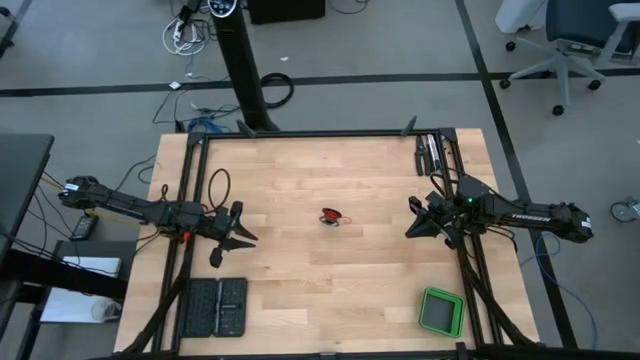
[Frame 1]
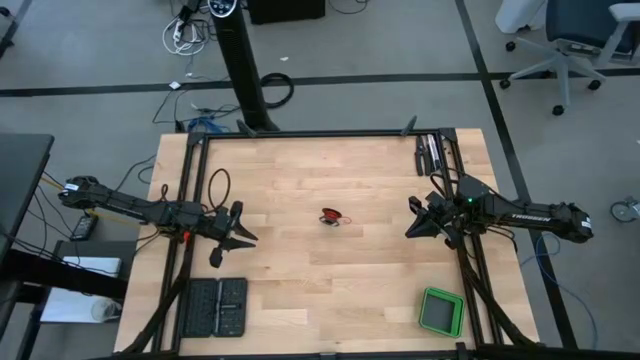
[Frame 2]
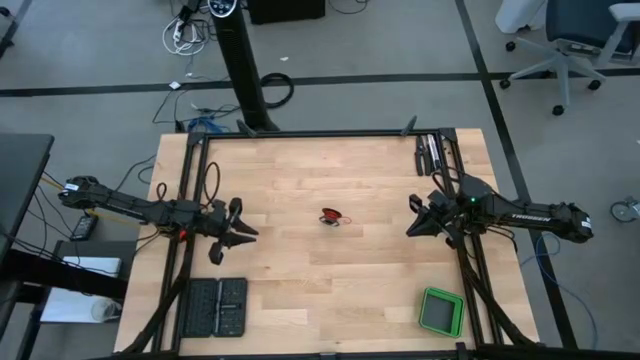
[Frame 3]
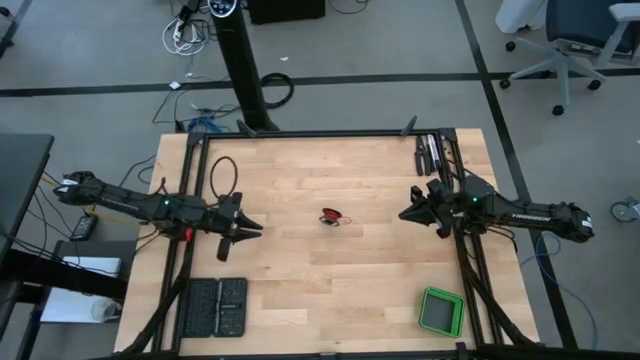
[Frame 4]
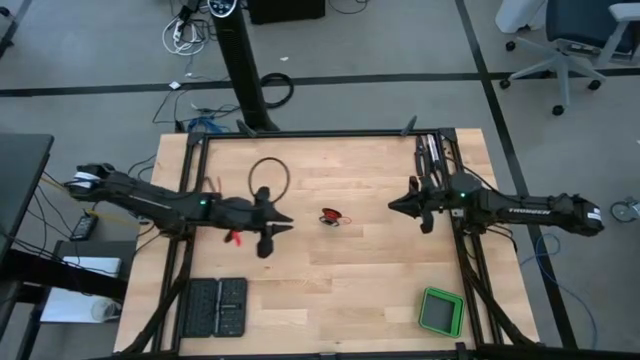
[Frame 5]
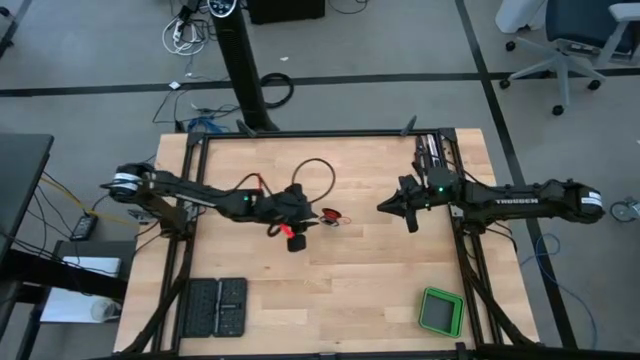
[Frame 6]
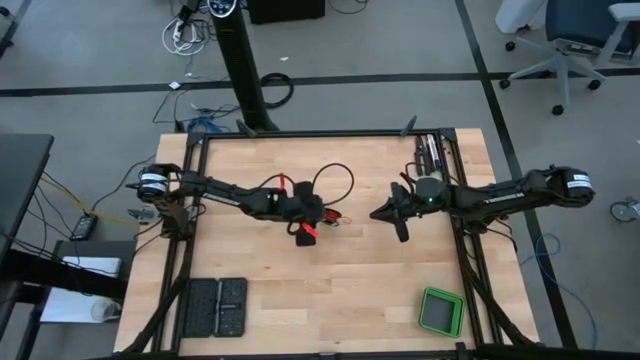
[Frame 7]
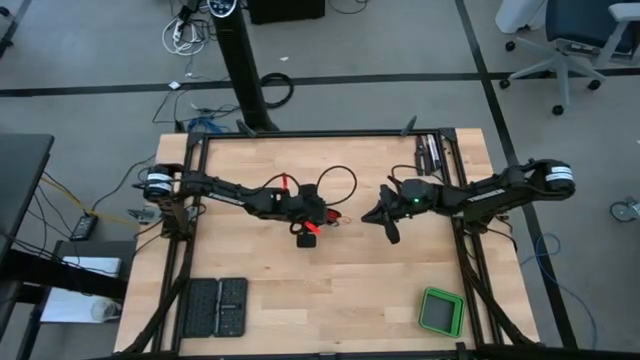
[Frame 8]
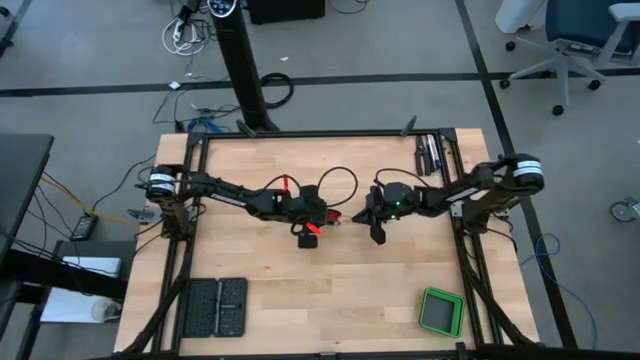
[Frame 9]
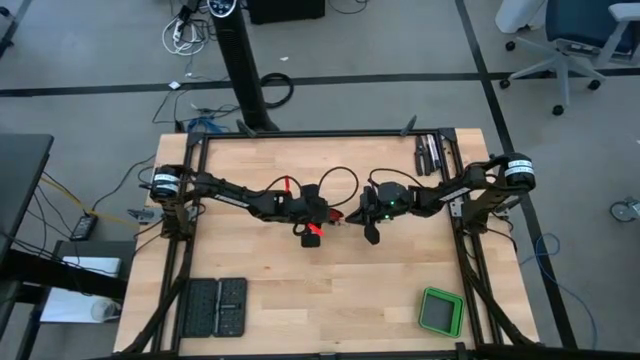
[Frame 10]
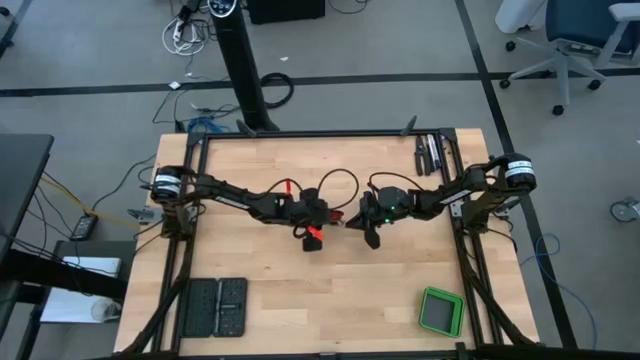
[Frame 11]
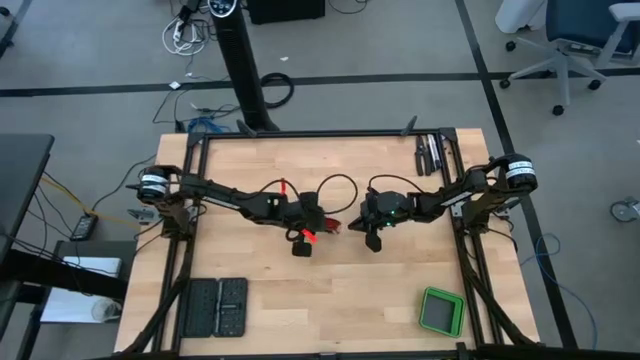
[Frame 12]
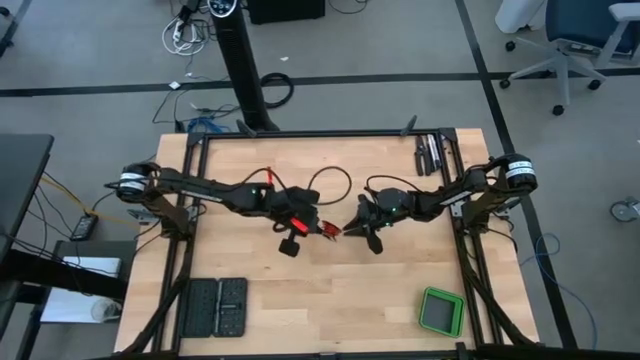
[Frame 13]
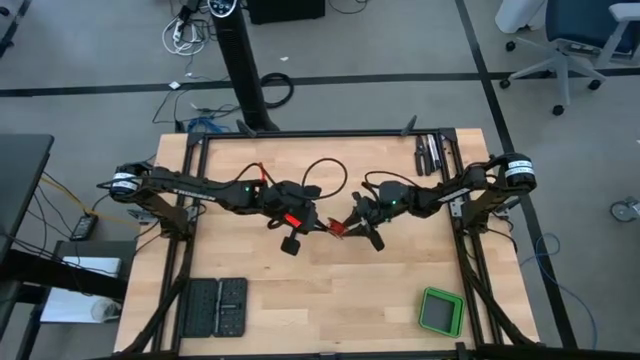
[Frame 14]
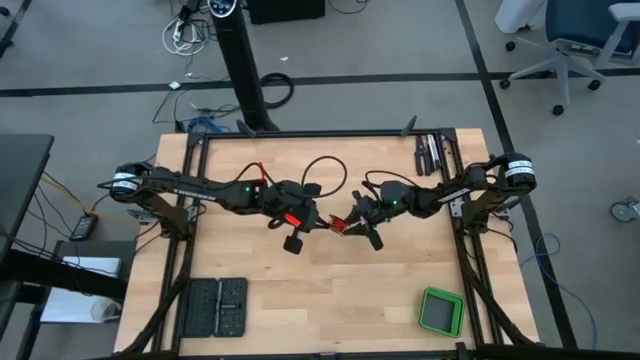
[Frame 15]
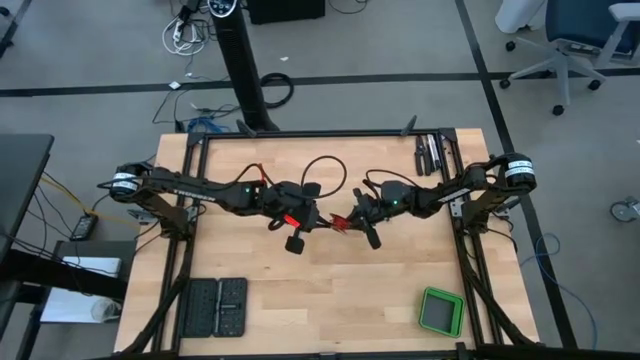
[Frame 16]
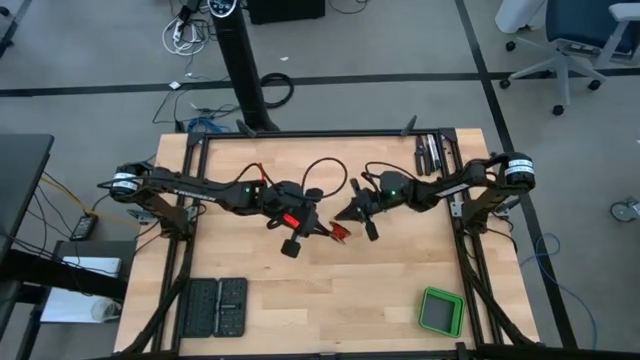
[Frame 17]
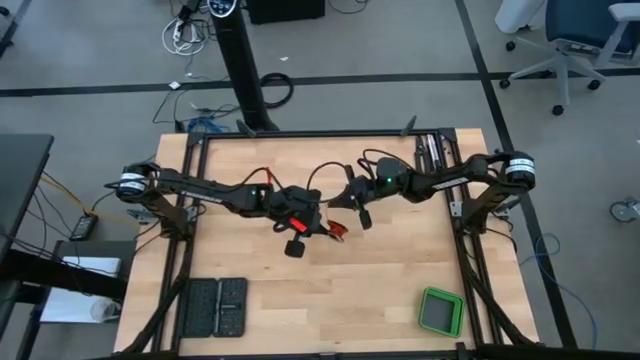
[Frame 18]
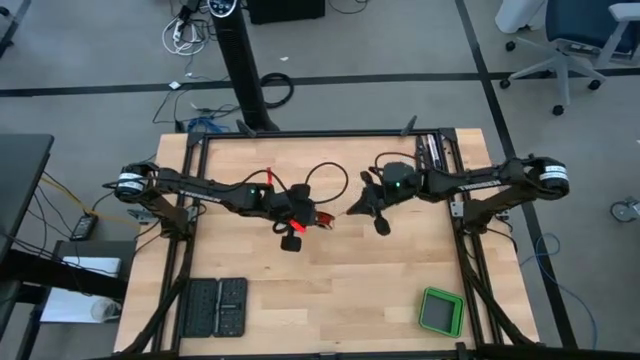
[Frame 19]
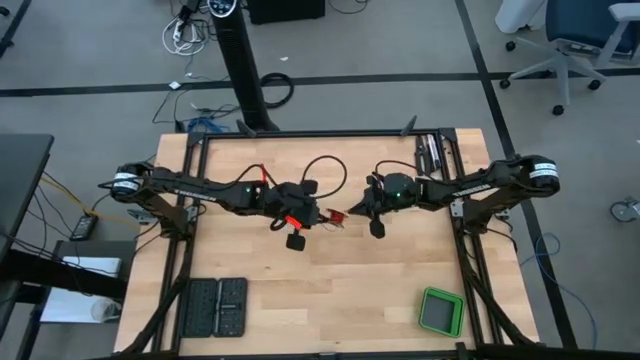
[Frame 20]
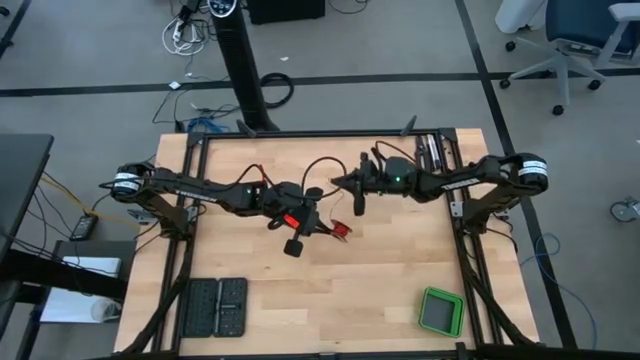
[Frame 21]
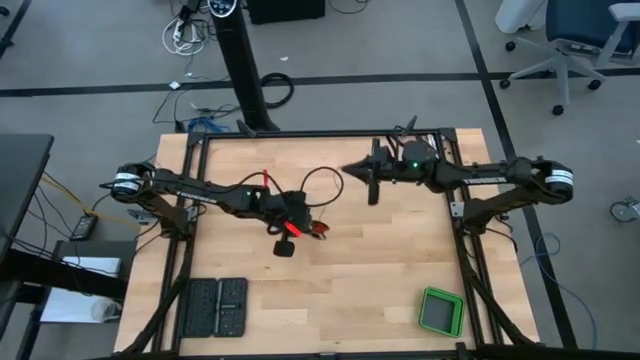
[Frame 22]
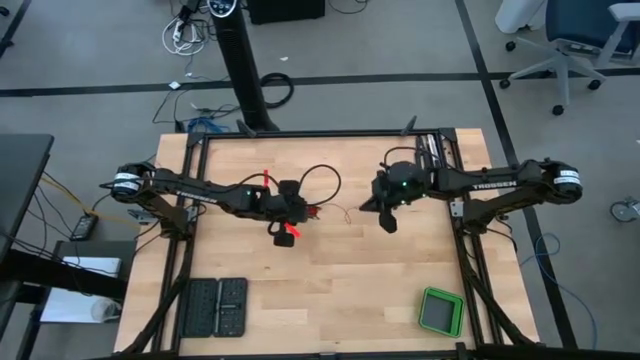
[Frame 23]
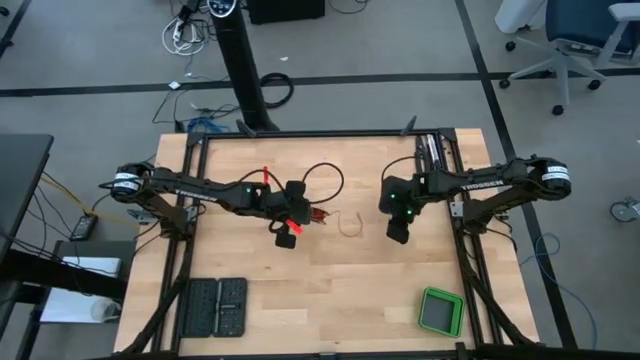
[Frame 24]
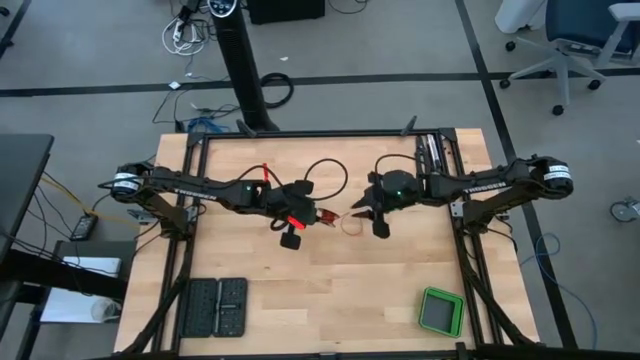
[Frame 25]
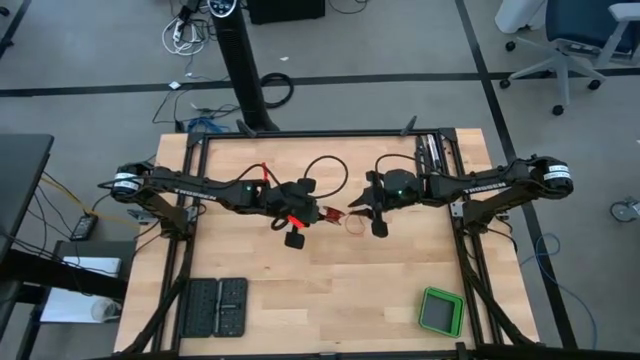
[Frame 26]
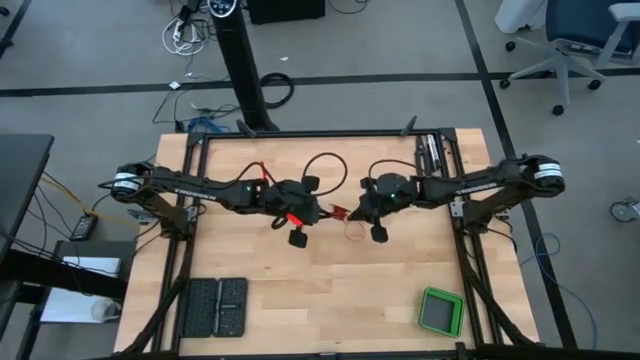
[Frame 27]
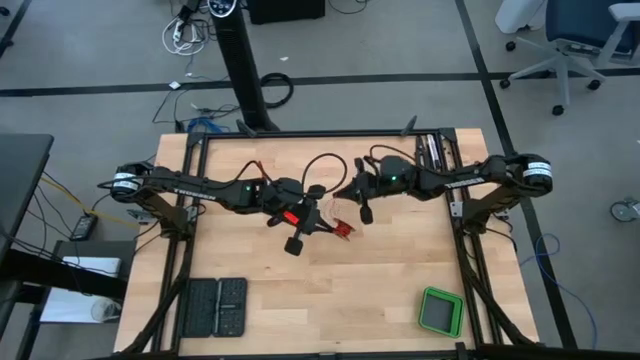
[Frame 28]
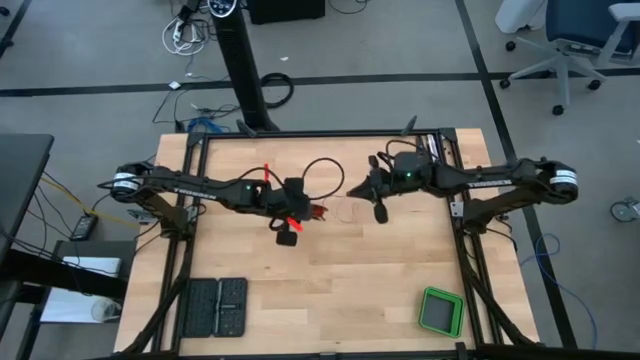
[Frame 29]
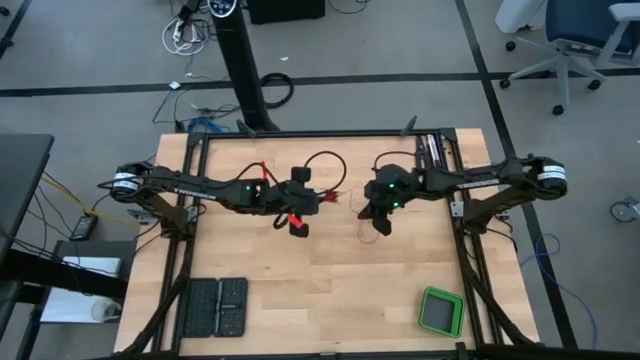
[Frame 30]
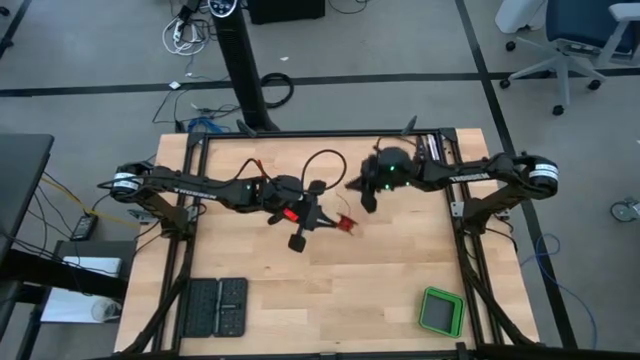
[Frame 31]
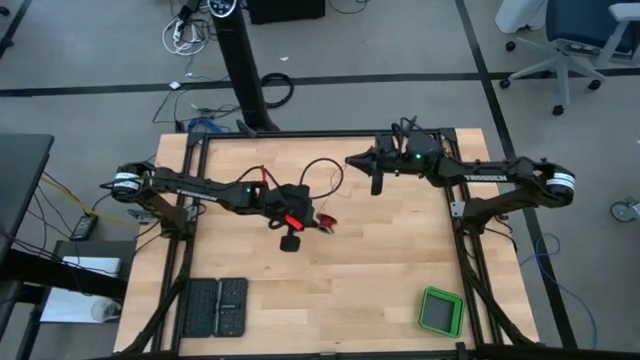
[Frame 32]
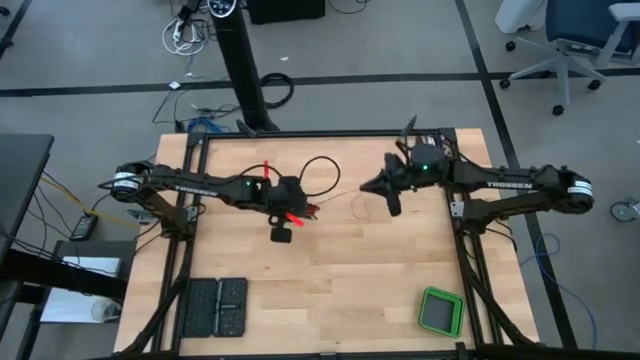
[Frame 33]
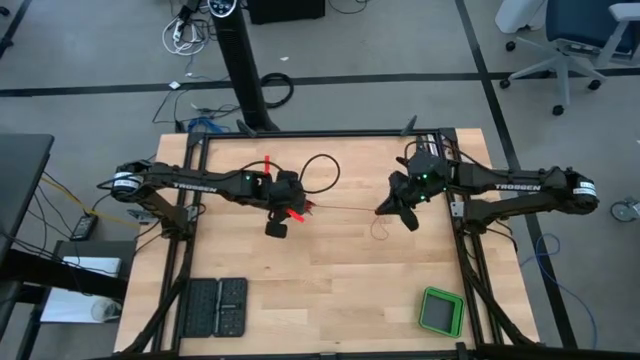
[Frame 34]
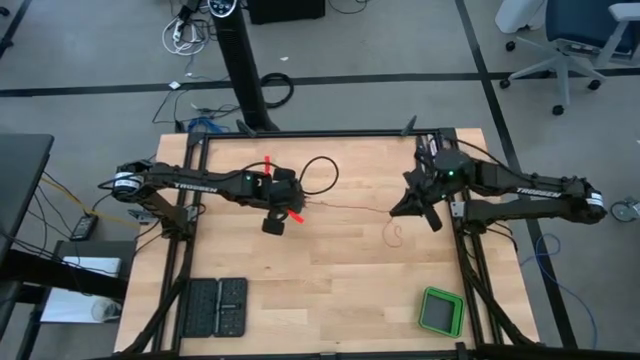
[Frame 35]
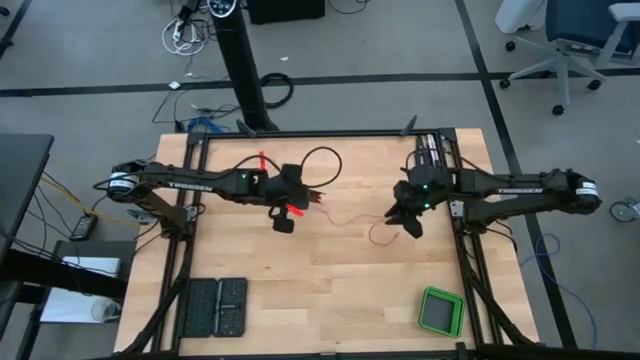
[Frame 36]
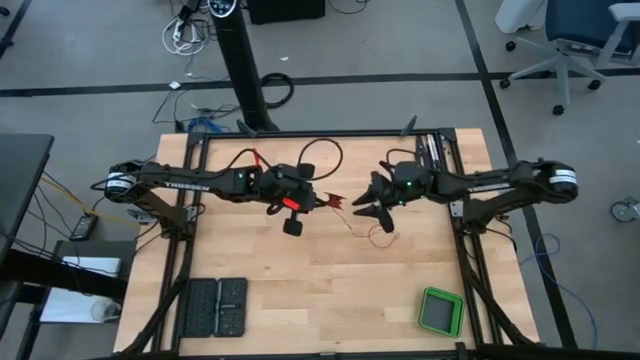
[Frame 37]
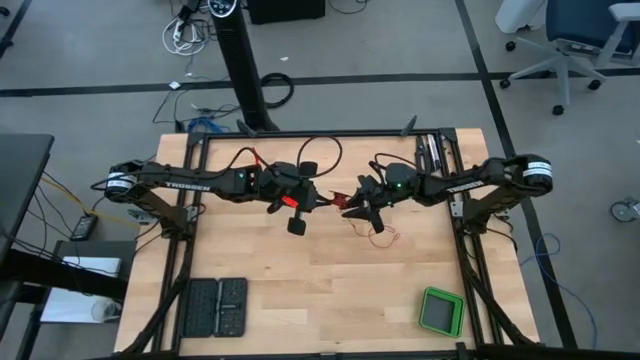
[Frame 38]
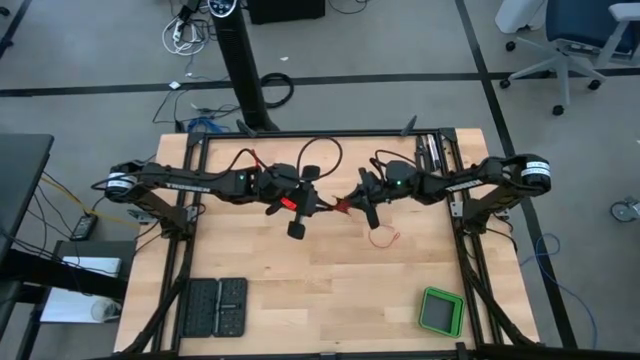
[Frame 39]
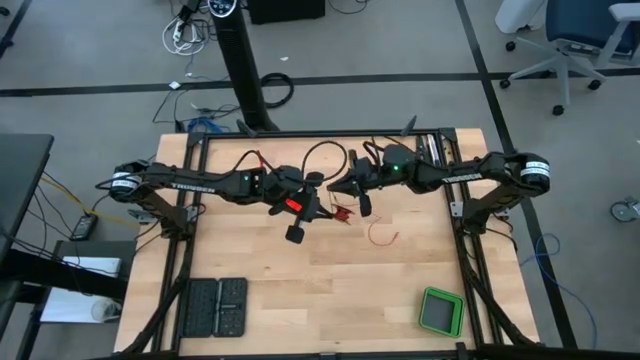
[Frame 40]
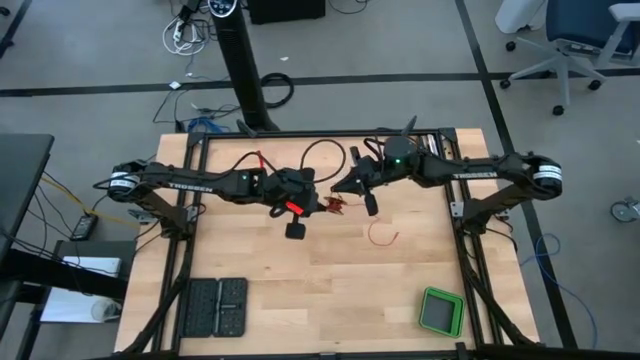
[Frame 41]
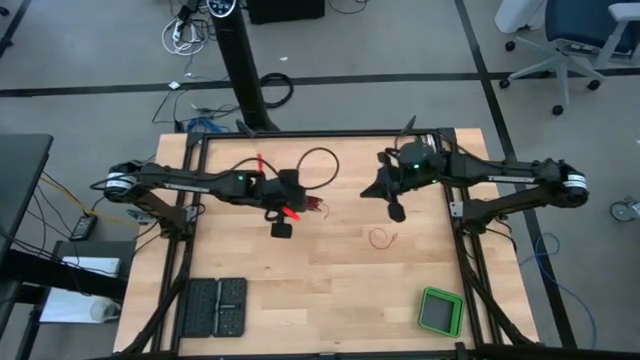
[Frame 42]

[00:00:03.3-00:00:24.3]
Task: Coil cords
Uncoil the red wire cable from the black spool
